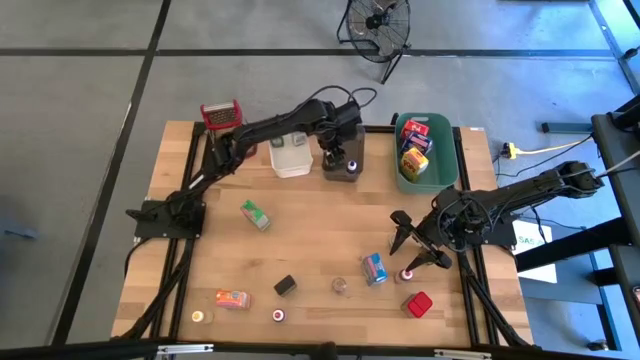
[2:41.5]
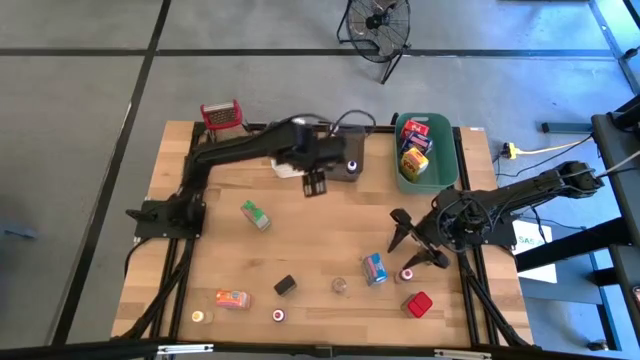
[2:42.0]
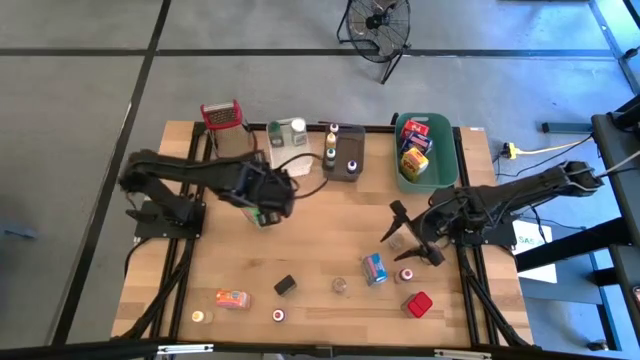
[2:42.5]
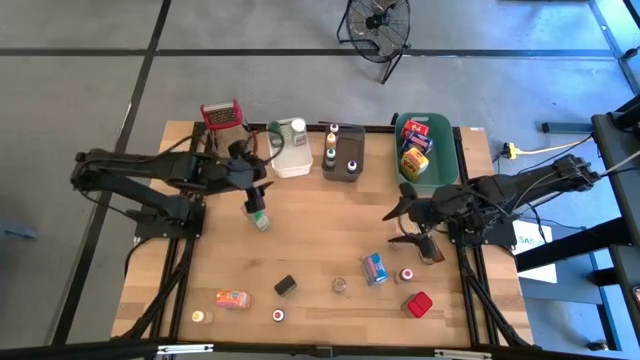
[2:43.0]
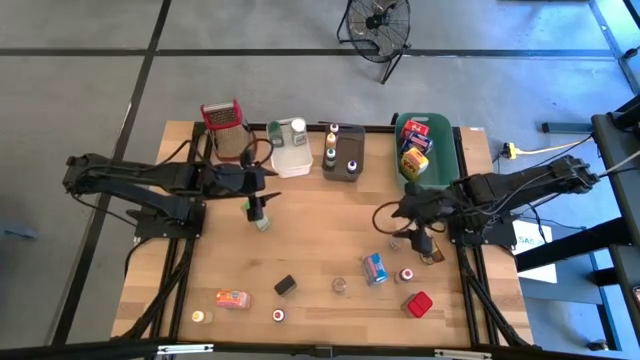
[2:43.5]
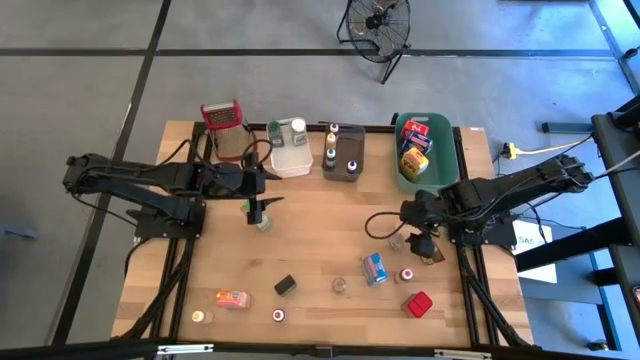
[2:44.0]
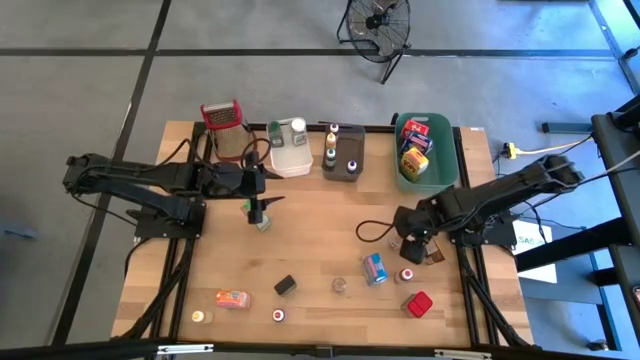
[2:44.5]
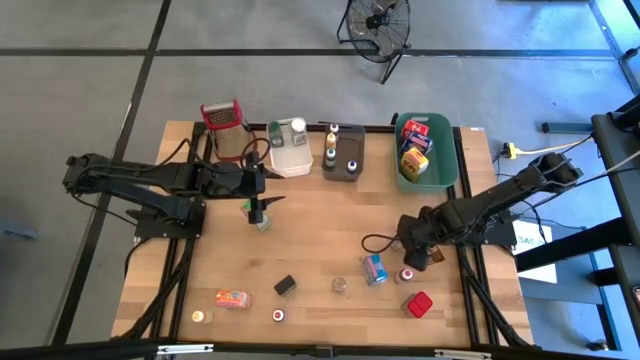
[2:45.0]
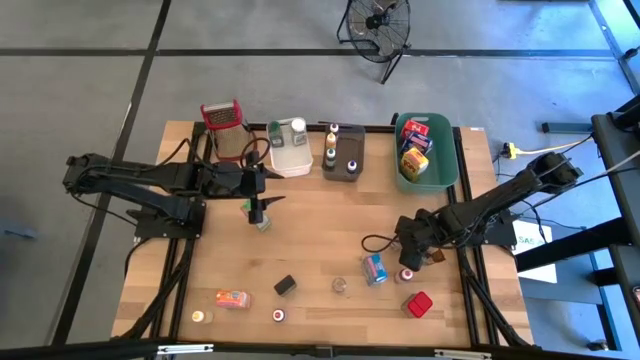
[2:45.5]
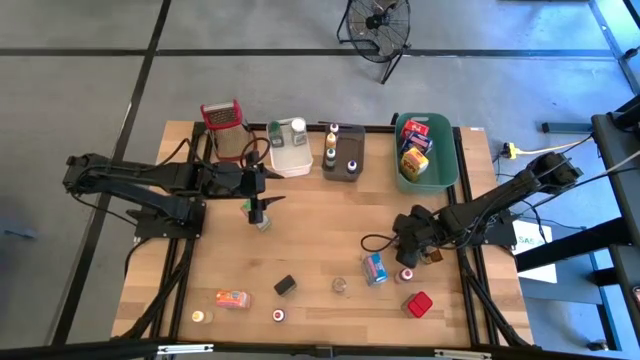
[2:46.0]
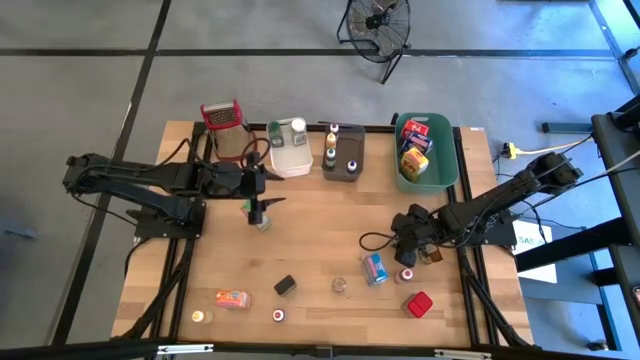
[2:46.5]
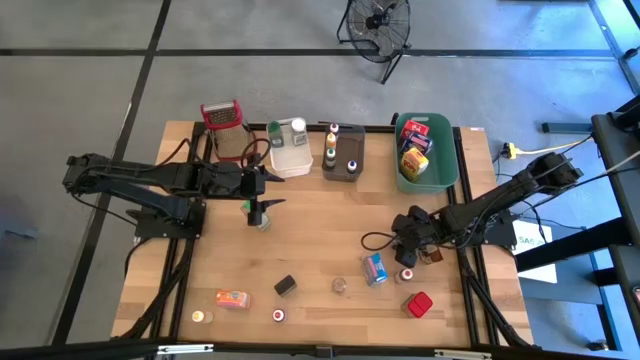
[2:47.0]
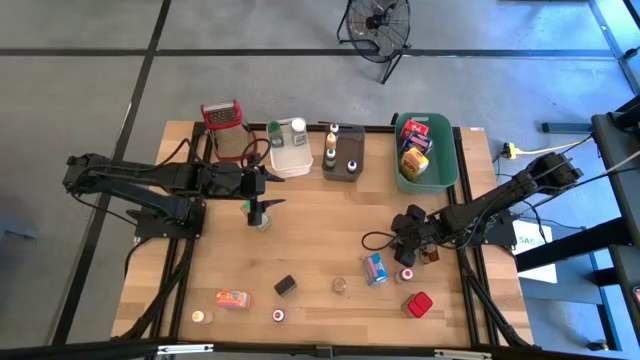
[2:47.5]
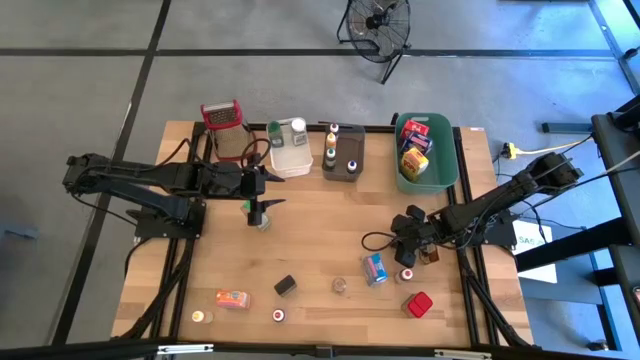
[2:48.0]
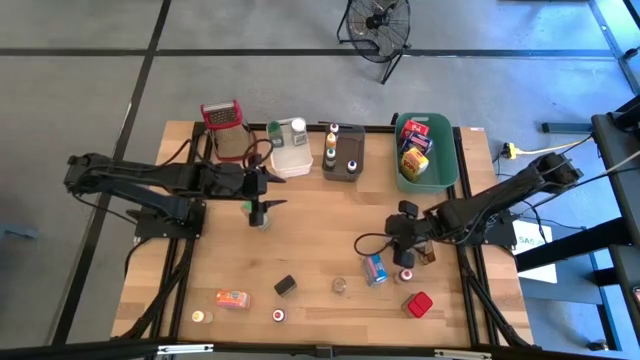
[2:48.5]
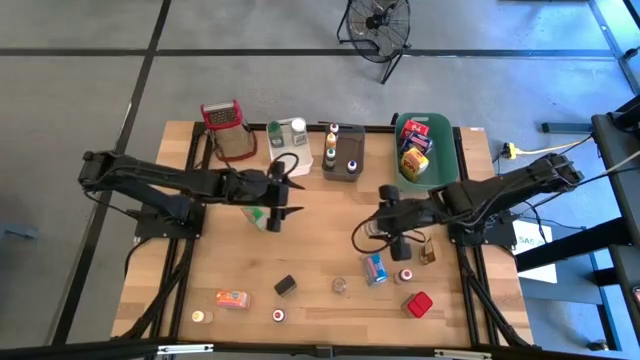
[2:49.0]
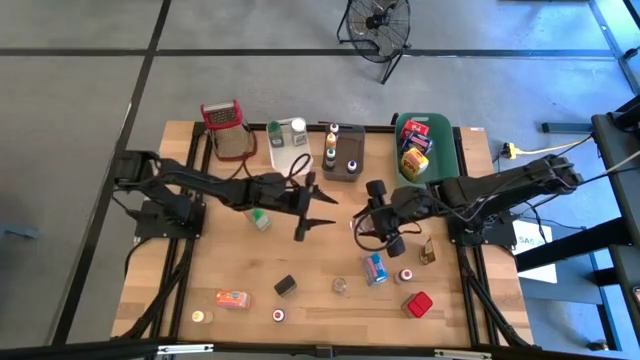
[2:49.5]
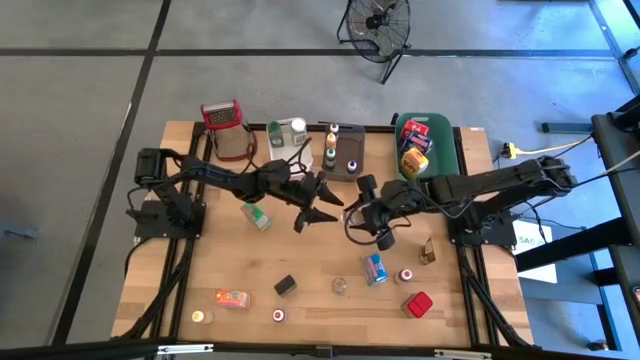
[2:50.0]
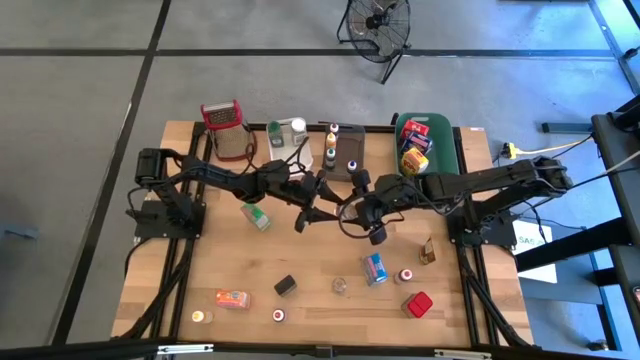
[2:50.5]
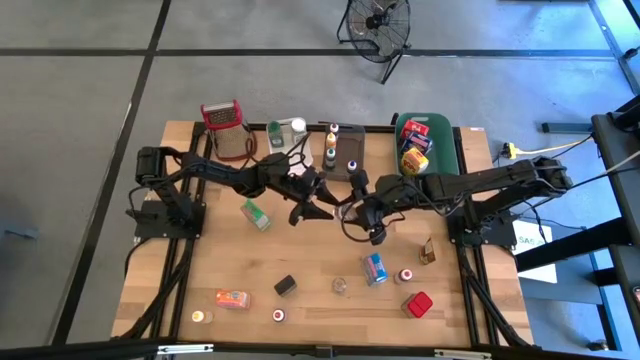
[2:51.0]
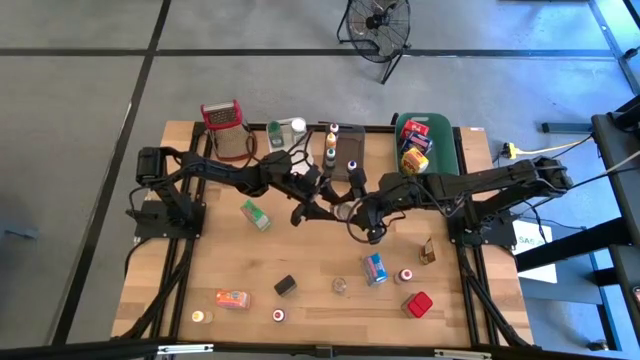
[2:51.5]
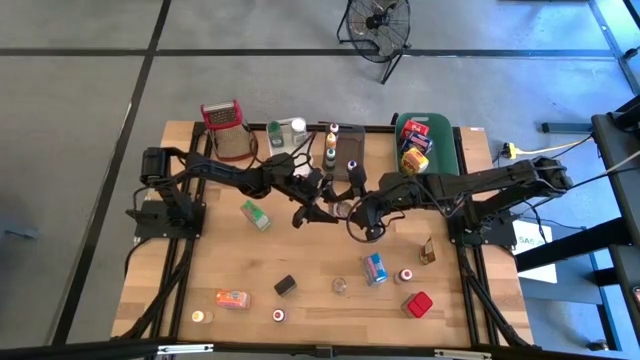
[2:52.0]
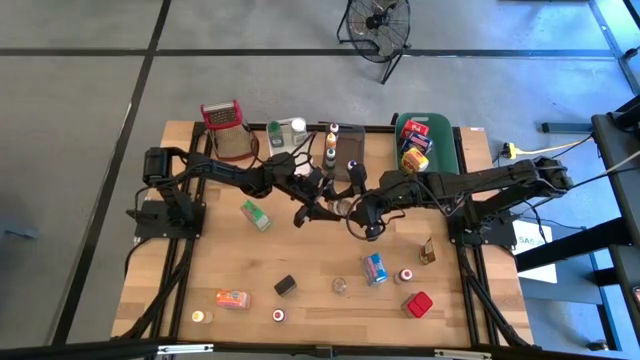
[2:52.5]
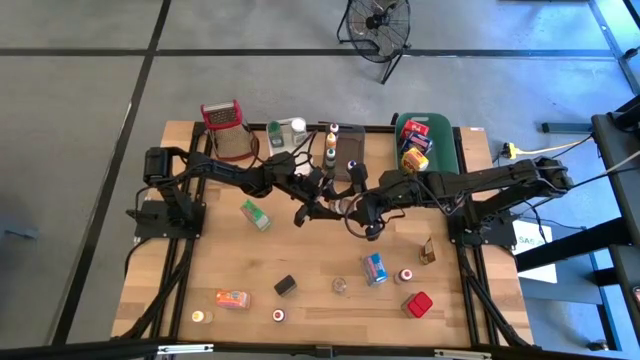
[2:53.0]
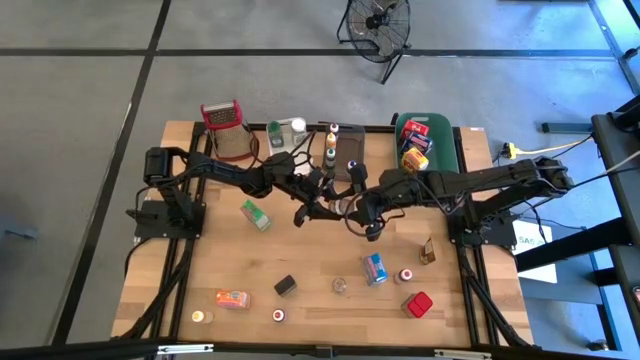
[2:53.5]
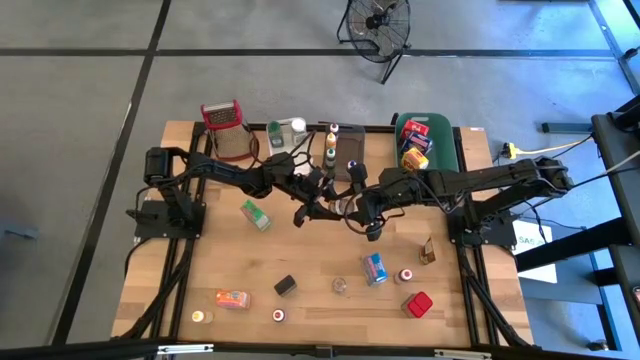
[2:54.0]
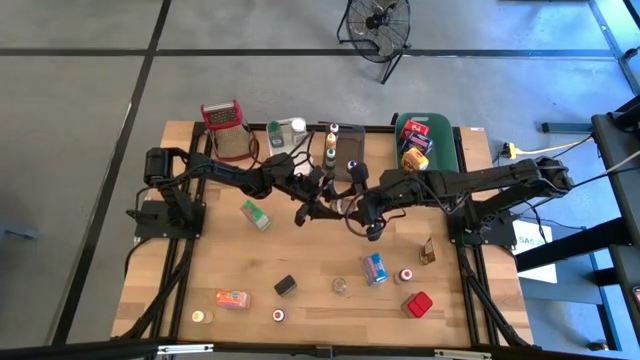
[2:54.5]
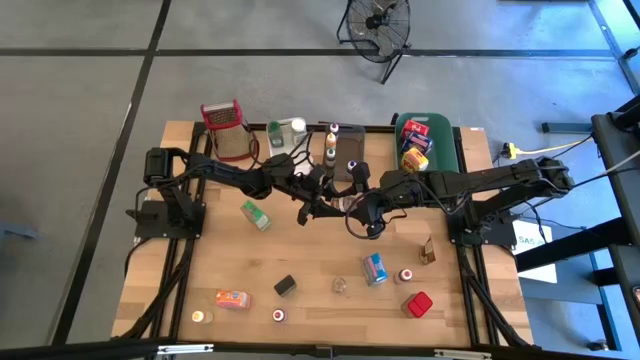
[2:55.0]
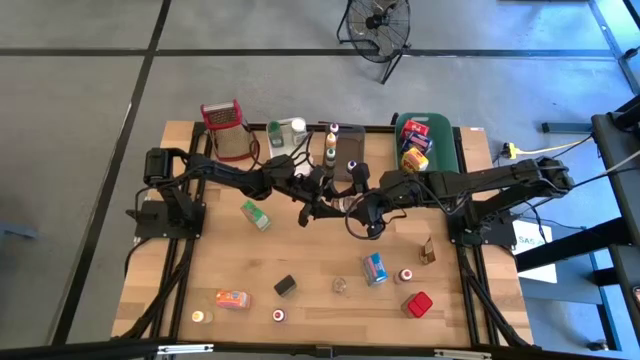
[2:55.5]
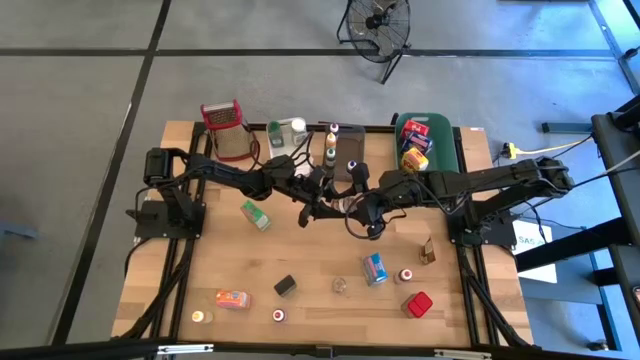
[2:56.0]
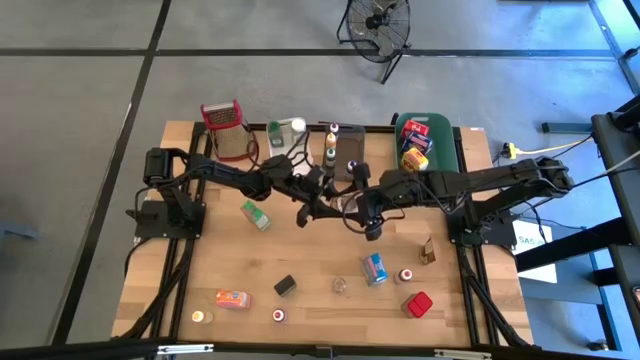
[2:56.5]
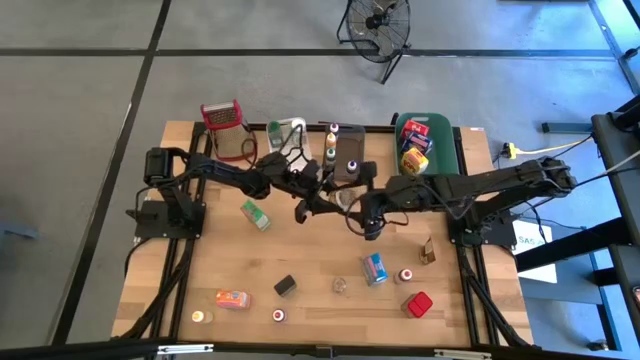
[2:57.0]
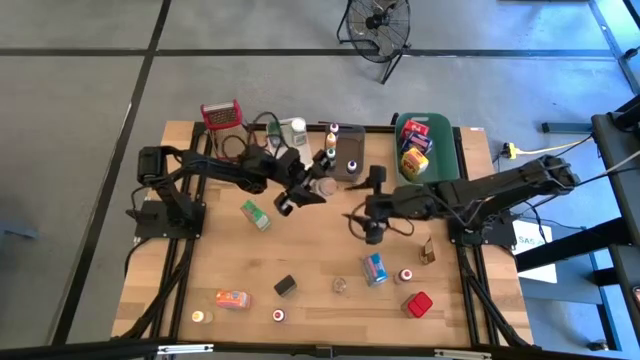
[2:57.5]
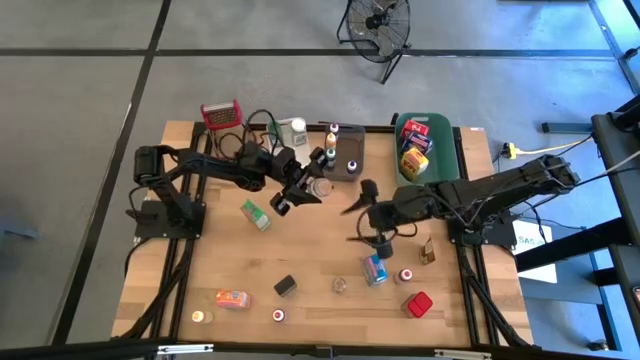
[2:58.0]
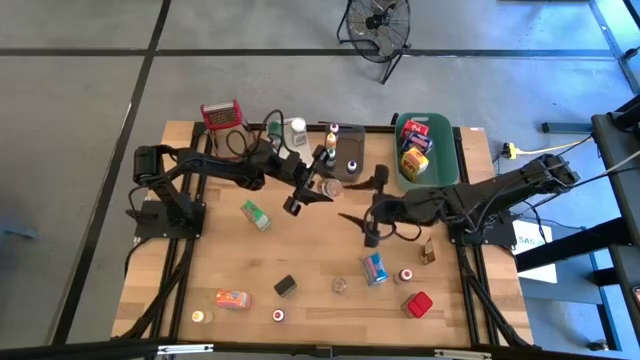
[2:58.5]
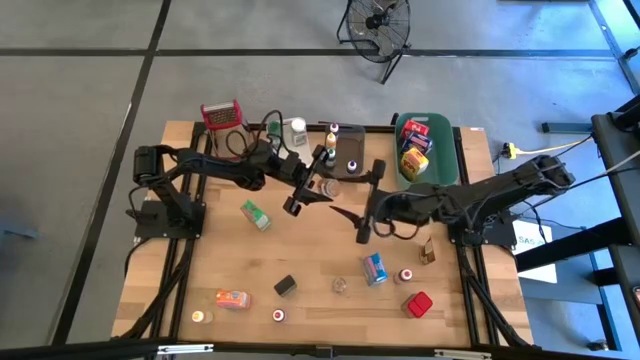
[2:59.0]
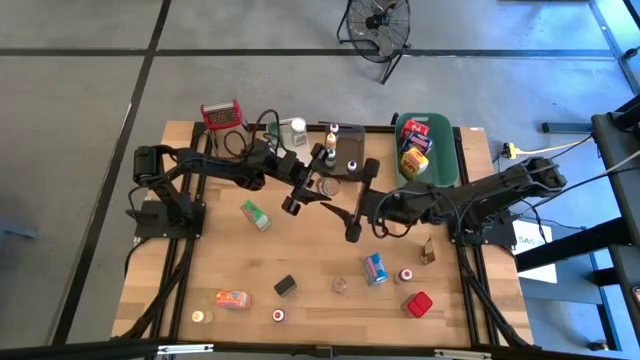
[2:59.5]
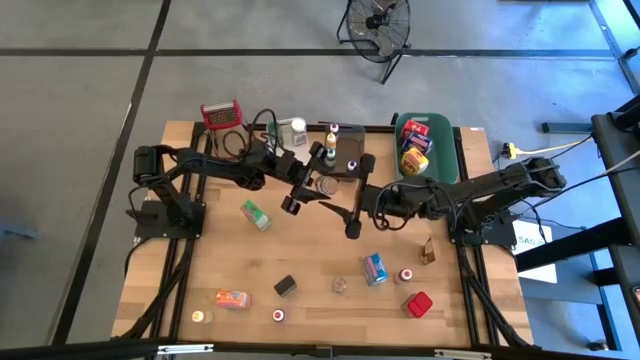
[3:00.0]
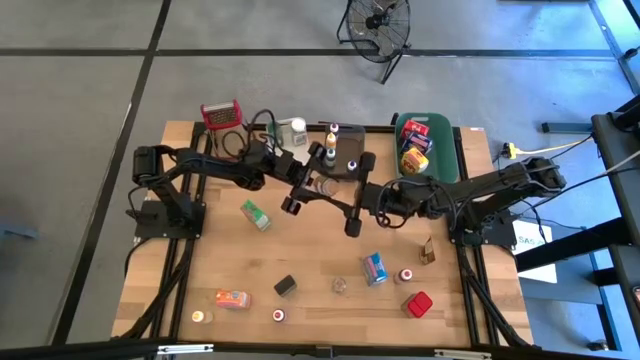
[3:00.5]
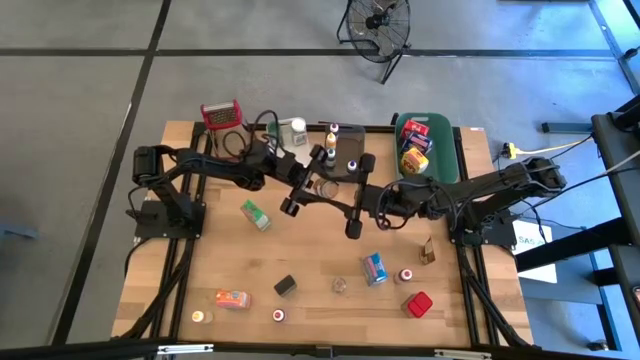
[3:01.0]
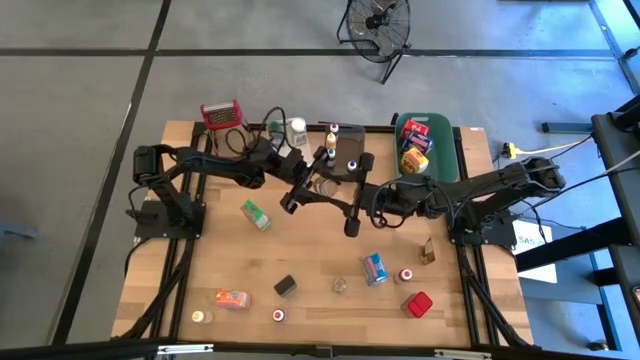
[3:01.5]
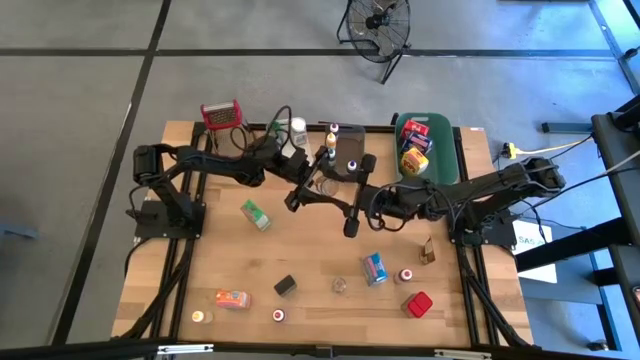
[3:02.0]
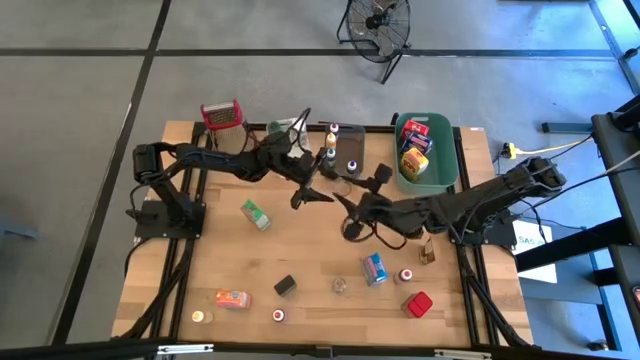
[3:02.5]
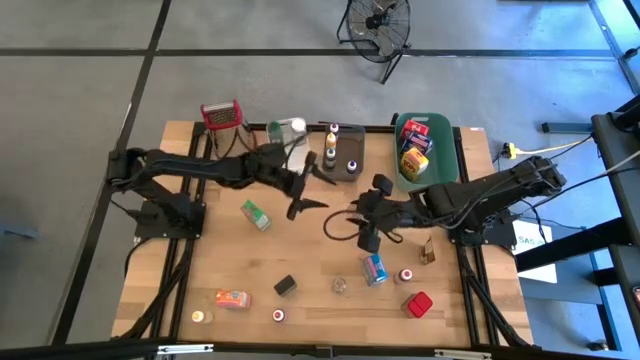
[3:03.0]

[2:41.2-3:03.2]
Task: Pick & Place Kitchen Items
Put the transparent seasoning into the white bin
